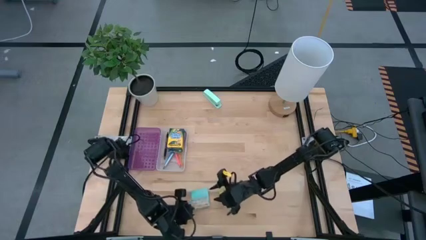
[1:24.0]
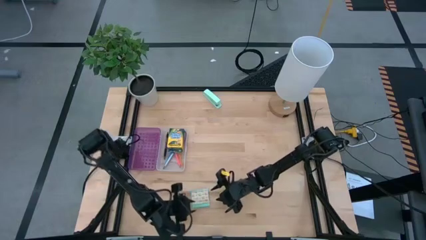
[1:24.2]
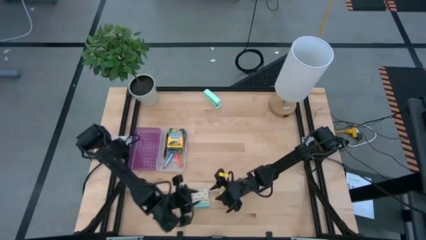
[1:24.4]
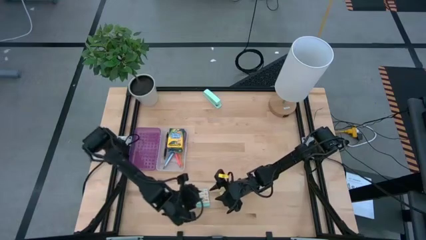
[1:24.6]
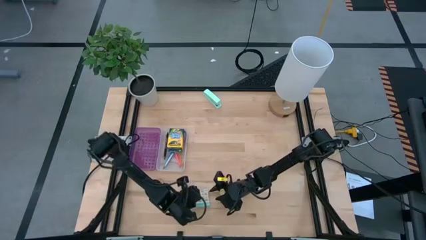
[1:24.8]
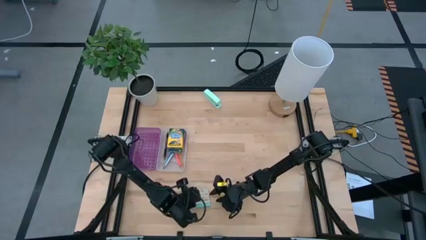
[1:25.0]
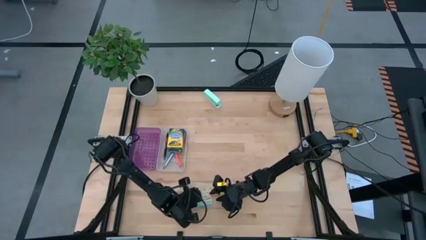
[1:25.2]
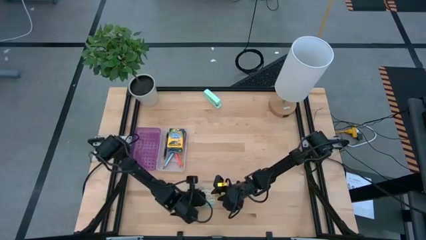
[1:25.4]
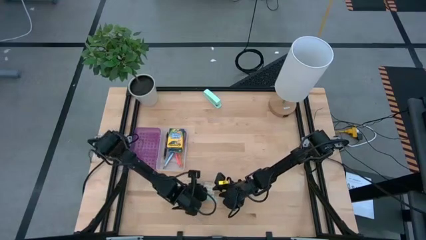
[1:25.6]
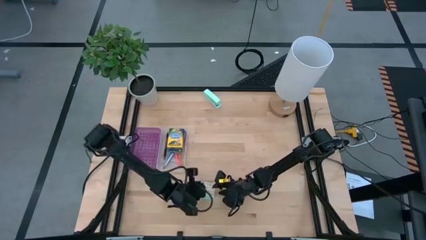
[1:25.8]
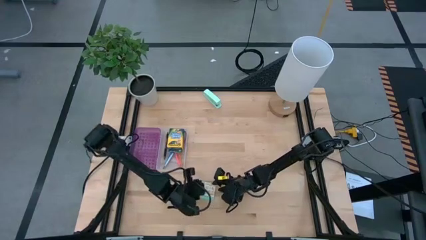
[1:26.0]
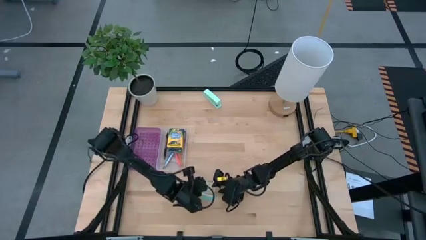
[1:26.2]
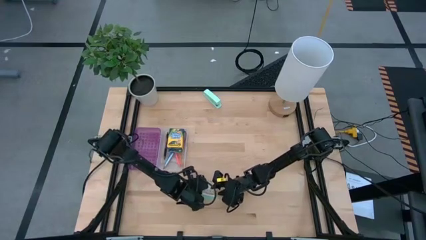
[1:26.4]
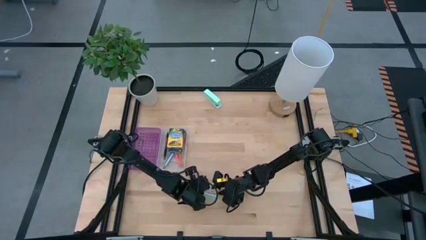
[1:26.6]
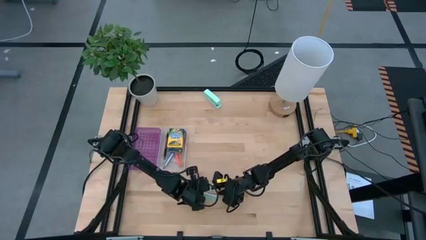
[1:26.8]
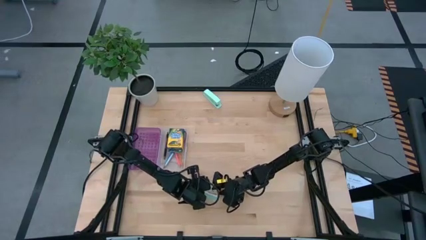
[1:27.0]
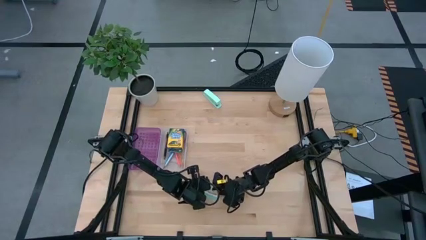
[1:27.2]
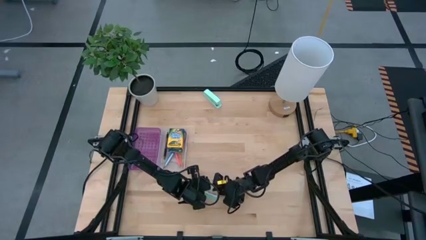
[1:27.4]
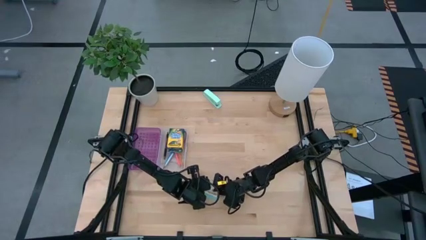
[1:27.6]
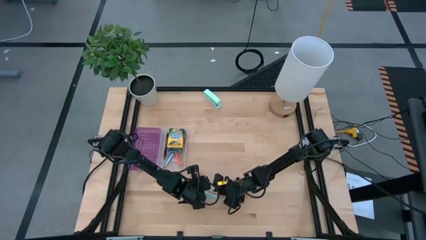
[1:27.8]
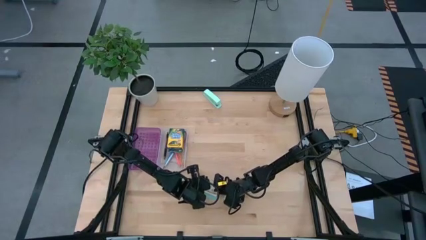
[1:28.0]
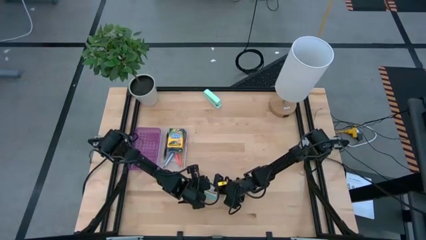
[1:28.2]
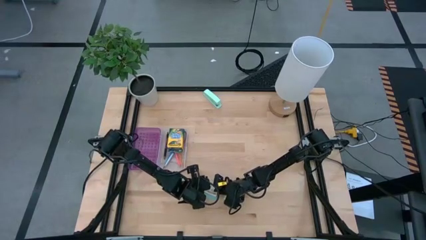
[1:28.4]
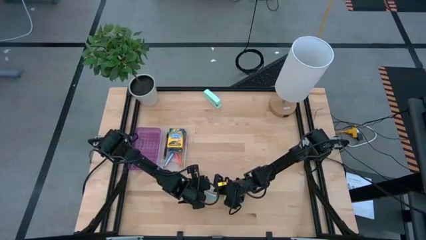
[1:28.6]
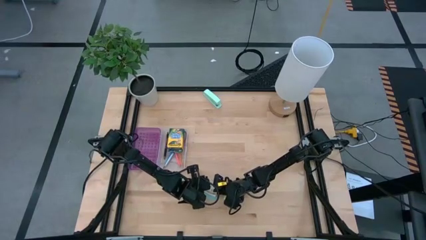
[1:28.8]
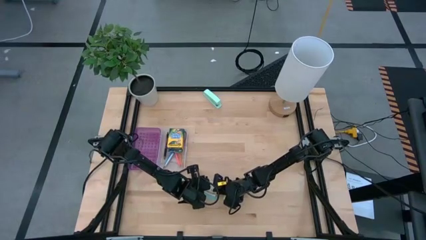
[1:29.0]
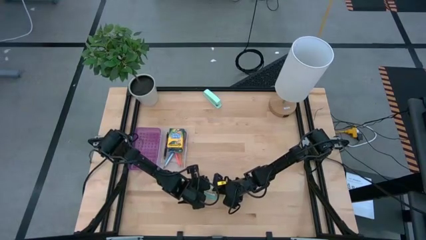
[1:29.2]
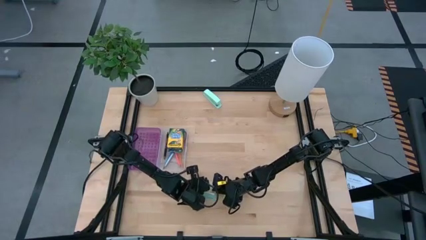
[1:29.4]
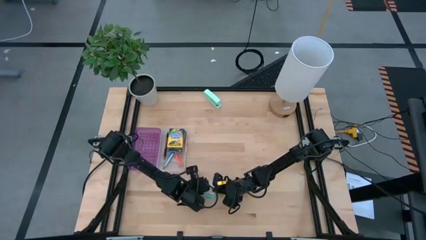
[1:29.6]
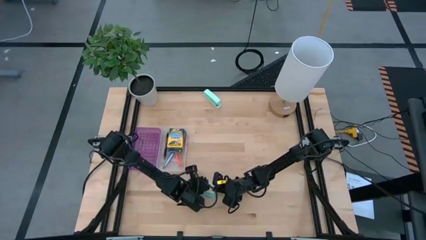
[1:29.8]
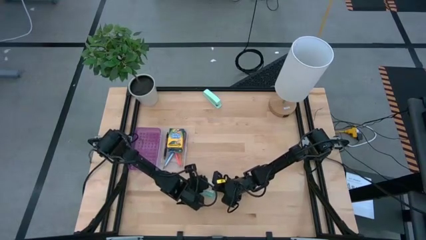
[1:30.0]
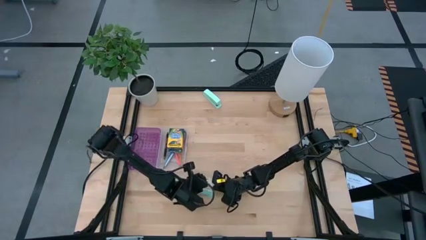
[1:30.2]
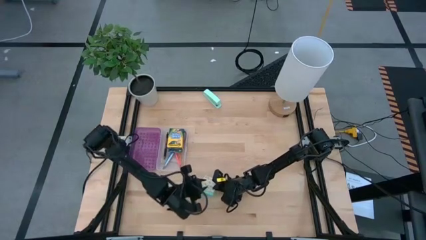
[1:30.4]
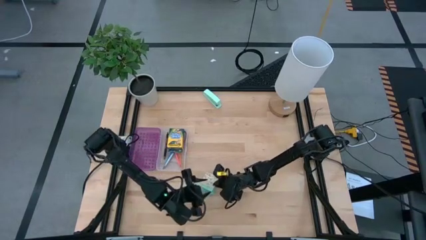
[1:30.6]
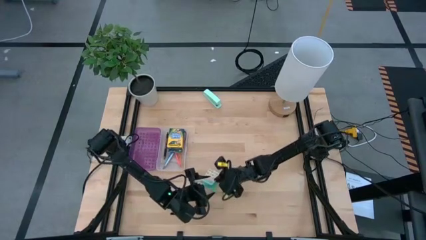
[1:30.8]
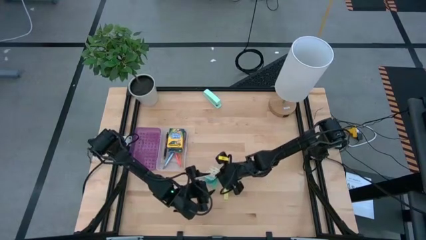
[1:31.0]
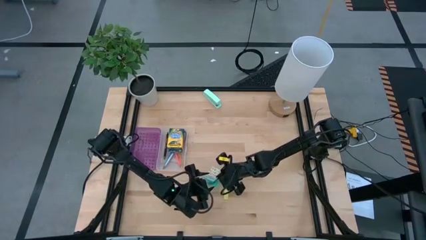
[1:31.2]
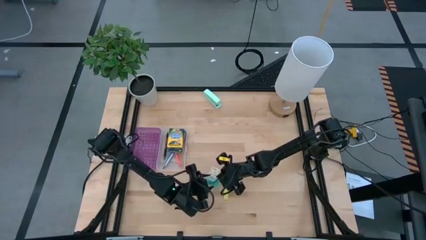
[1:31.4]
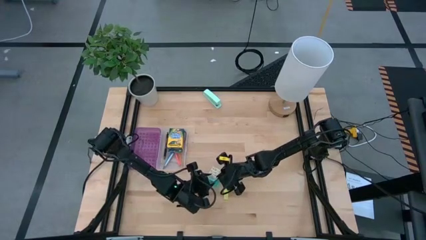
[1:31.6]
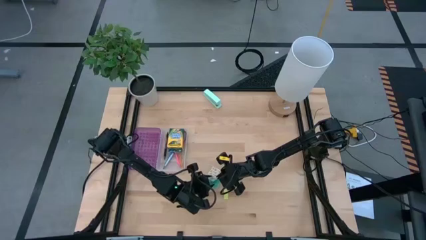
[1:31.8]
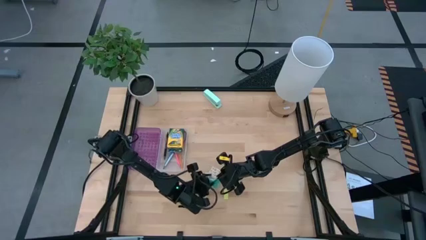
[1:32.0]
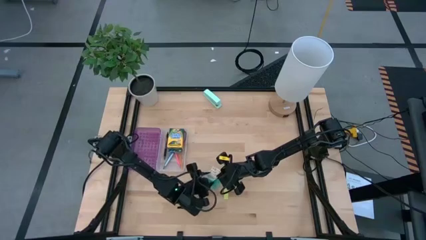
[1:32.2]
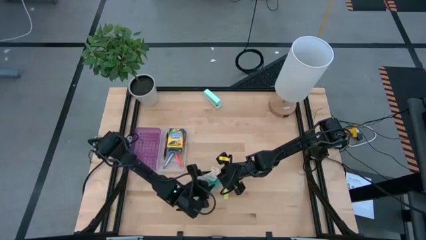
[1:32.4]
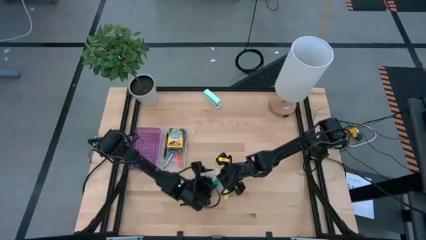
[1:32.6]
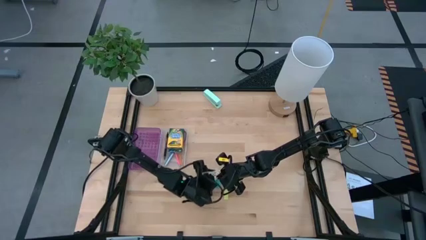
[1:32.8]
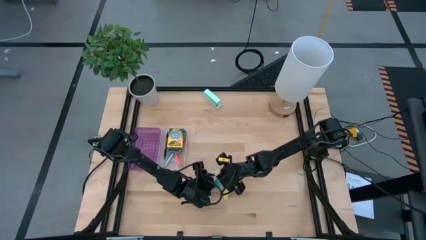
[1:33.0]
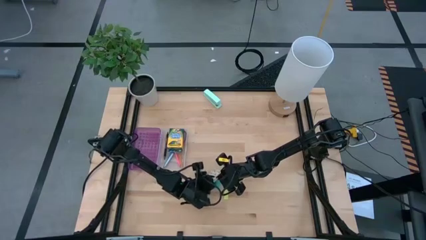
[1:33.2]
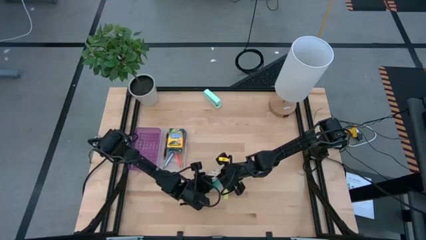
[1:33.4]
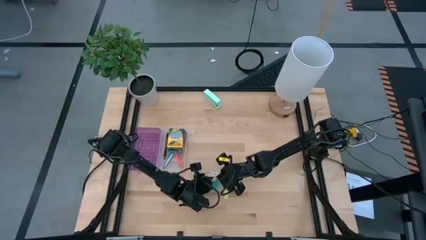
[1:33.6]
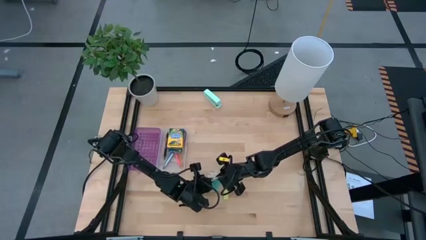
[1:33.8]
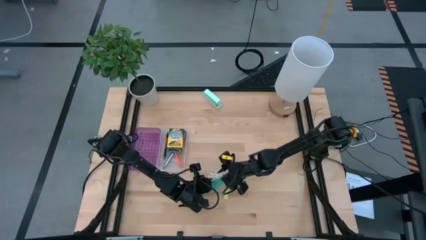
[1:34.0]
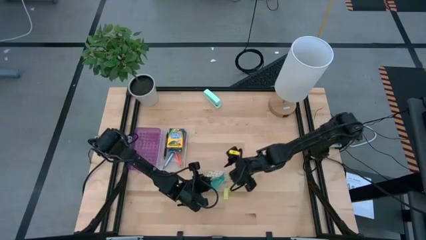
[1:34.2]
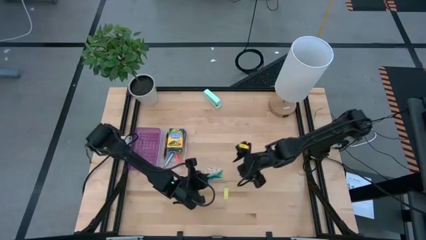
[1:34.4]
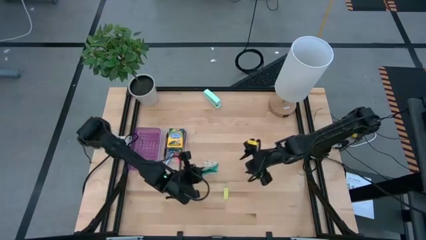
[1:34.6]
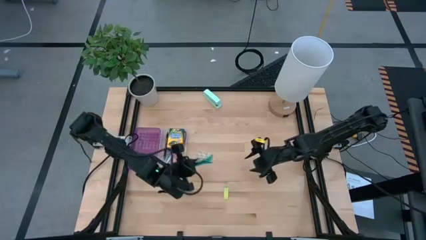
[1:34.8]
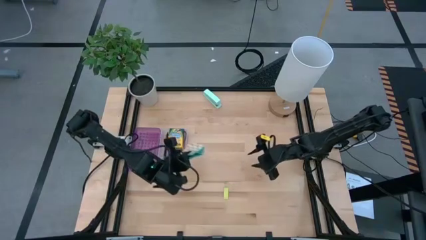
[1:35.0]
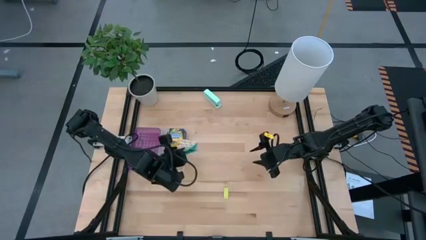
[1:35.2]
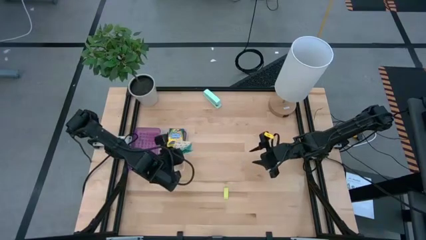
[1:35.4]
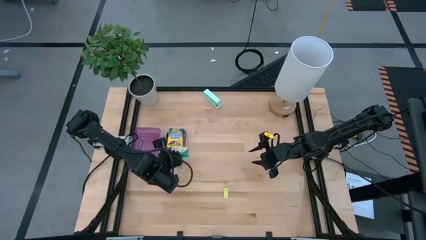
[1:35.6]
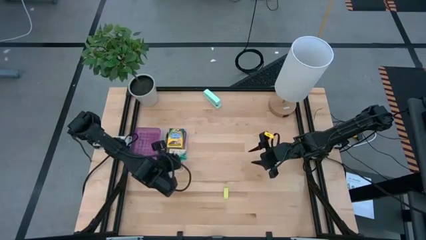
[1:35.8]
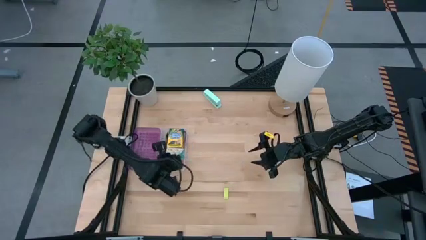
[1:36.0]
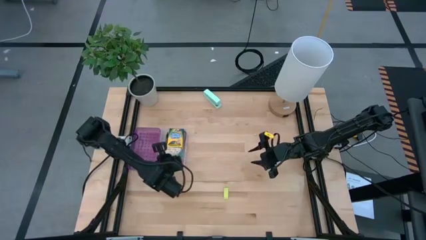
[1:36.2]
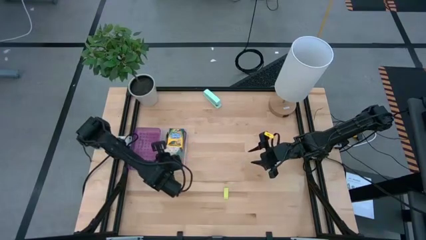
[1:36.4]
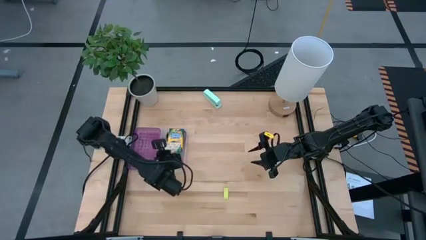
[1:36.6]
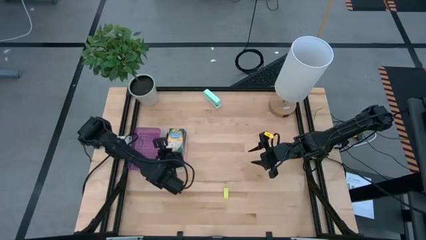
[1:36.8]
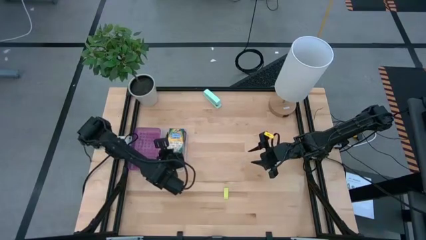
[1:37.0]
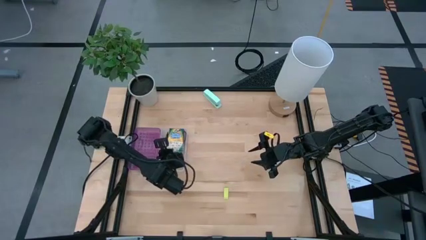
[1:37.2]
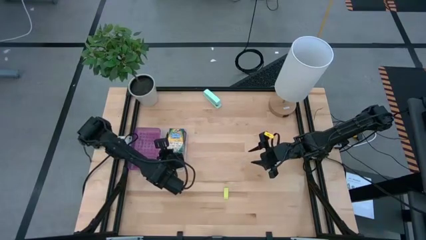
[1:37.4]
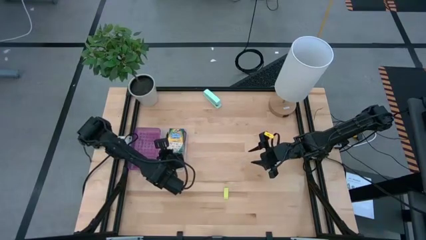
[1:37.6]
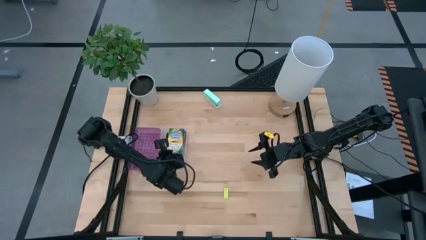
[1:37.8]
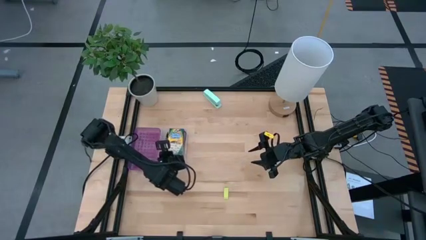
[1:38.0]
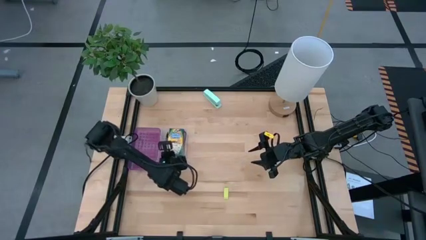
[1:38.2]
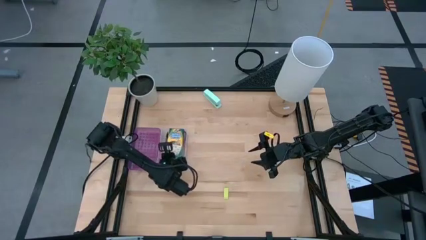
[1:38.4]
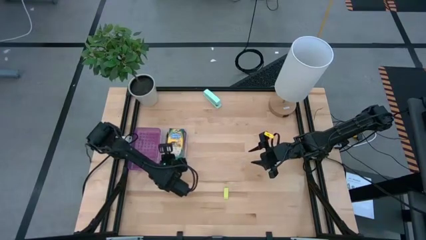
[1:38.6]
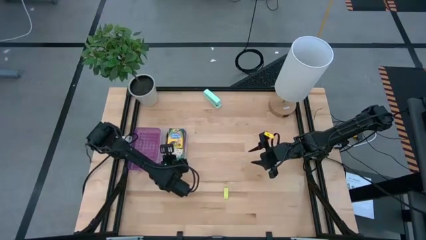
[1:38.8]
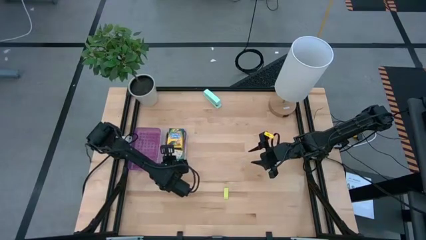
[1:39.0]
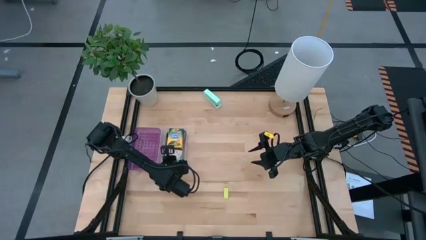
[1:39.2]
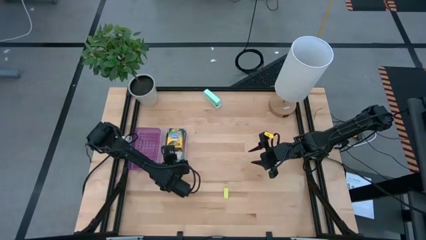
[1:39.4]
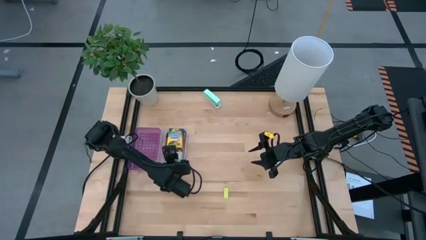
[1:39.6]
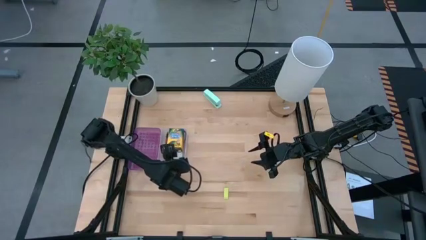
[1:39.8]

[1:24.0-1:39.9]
Task: Pack school essentials
Put the blue sticky note into the purple supply box
